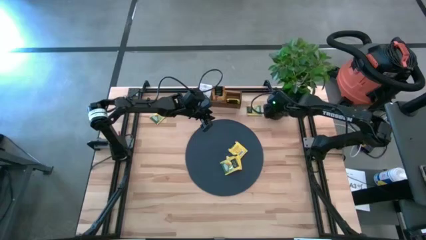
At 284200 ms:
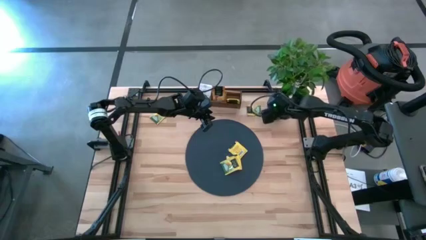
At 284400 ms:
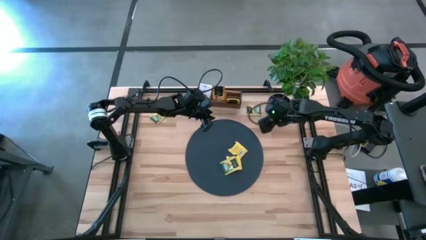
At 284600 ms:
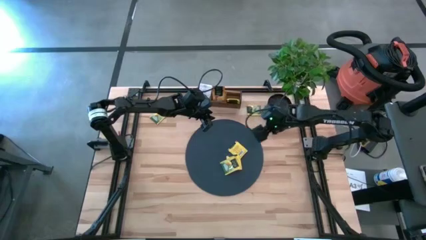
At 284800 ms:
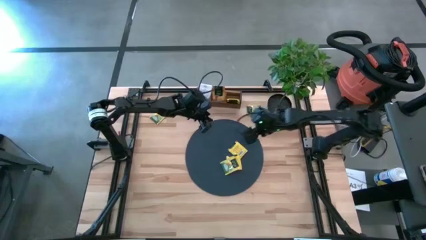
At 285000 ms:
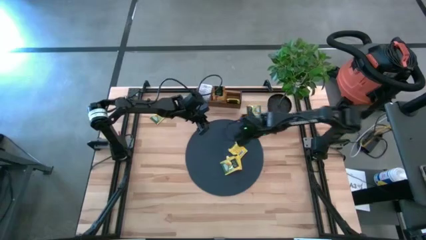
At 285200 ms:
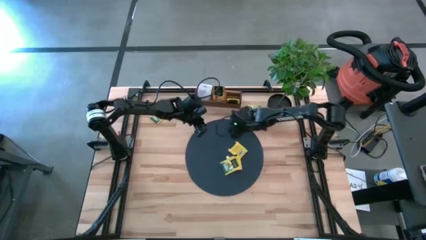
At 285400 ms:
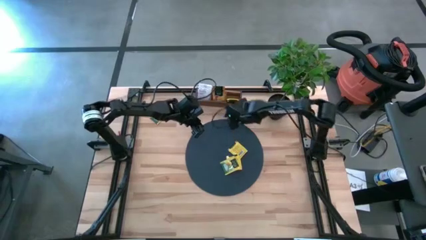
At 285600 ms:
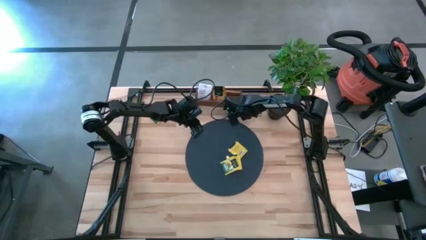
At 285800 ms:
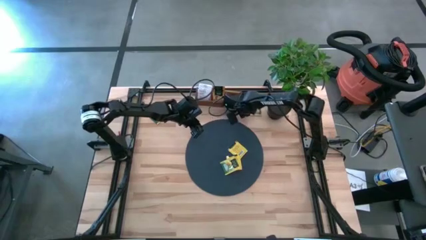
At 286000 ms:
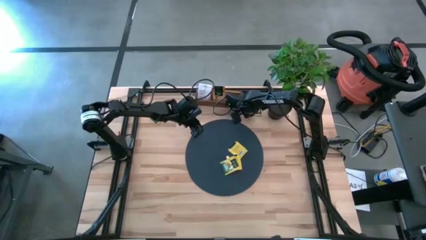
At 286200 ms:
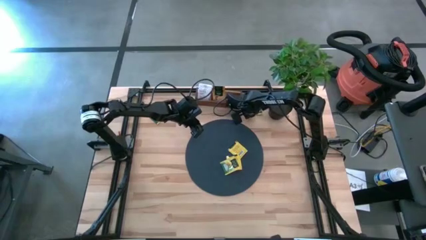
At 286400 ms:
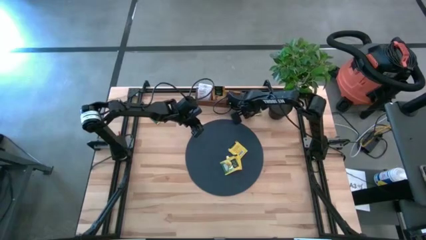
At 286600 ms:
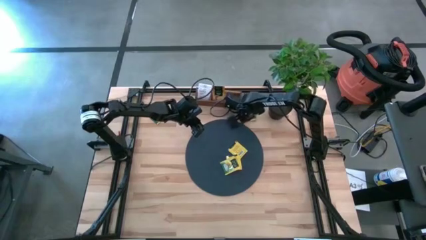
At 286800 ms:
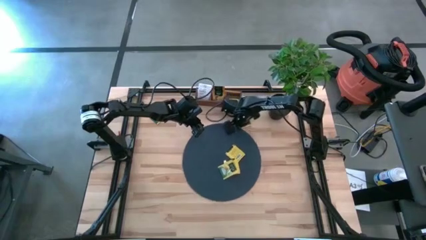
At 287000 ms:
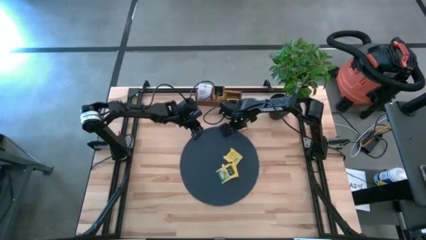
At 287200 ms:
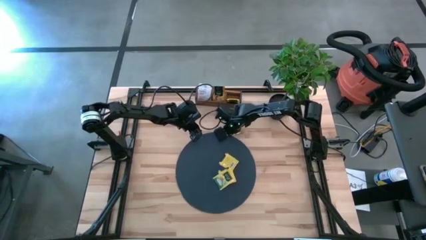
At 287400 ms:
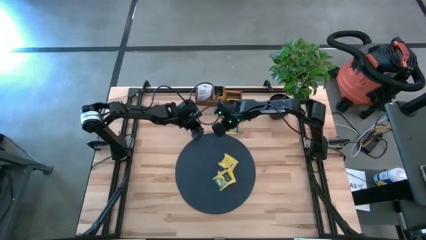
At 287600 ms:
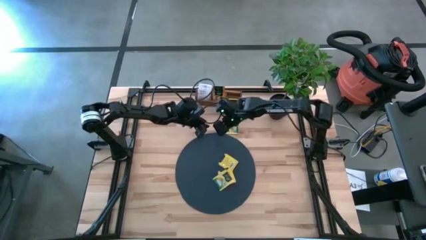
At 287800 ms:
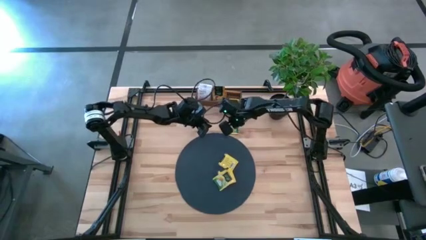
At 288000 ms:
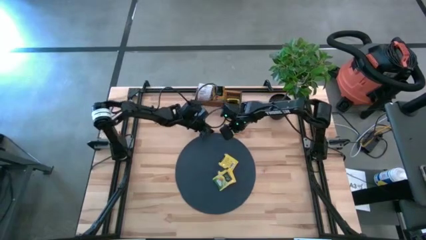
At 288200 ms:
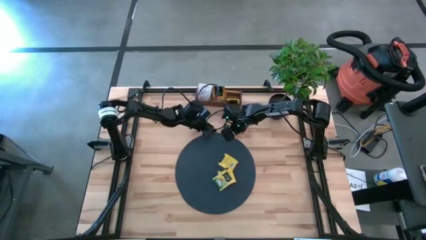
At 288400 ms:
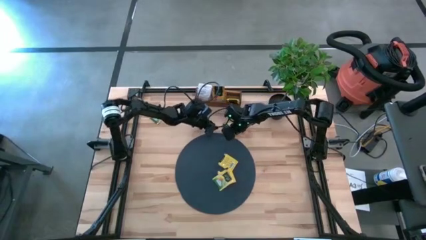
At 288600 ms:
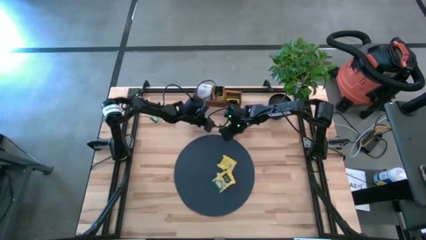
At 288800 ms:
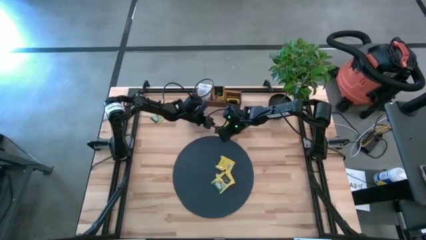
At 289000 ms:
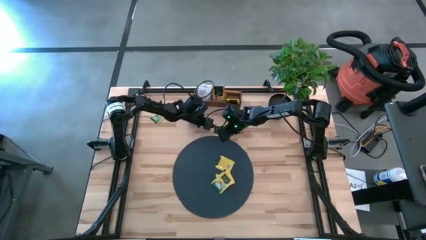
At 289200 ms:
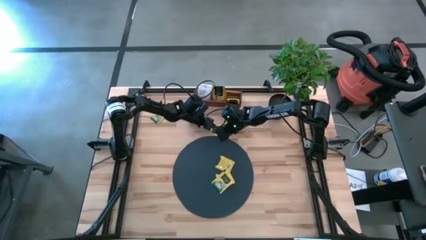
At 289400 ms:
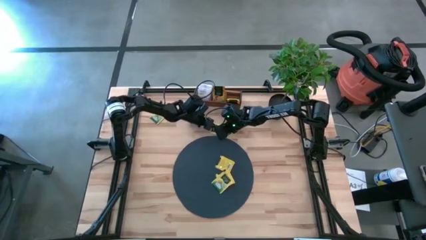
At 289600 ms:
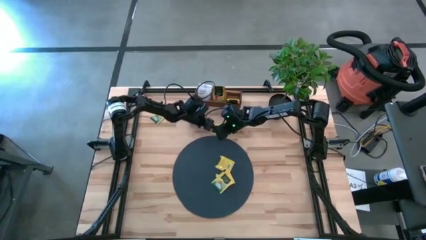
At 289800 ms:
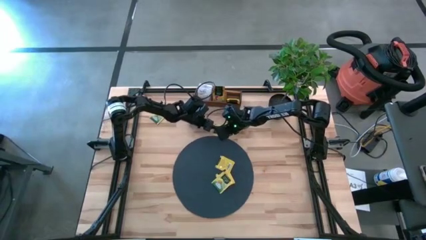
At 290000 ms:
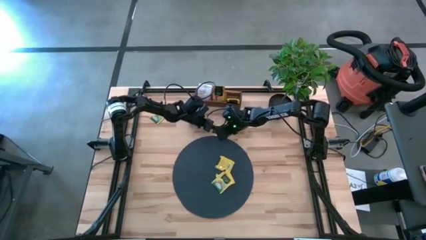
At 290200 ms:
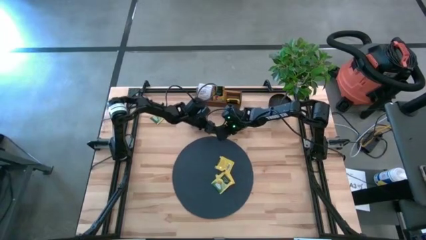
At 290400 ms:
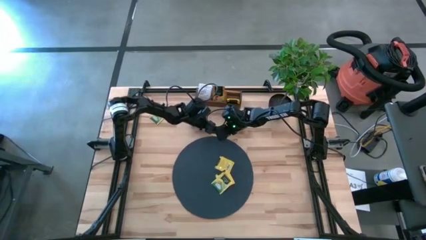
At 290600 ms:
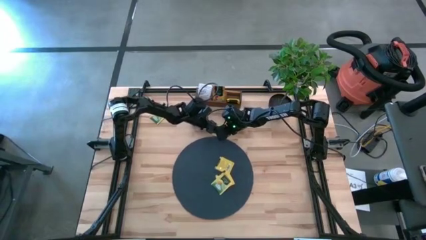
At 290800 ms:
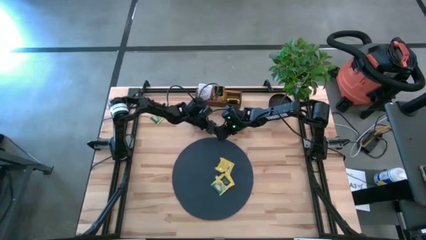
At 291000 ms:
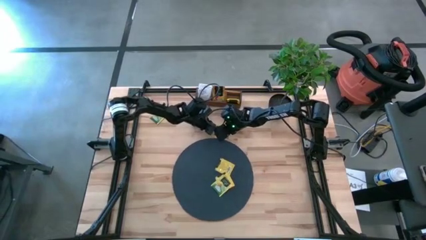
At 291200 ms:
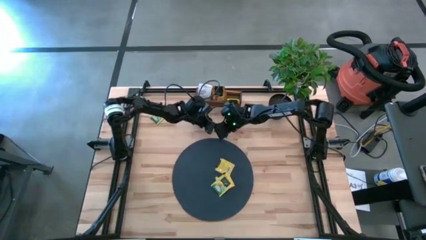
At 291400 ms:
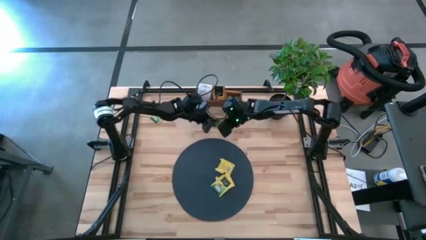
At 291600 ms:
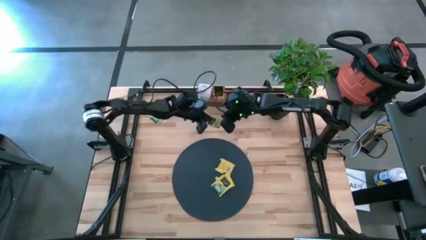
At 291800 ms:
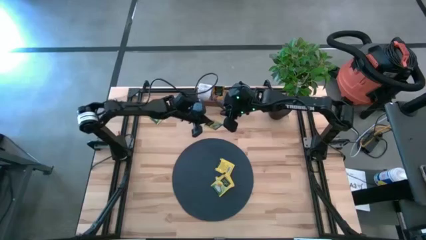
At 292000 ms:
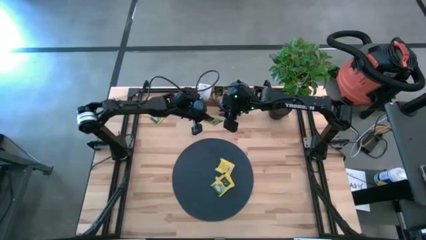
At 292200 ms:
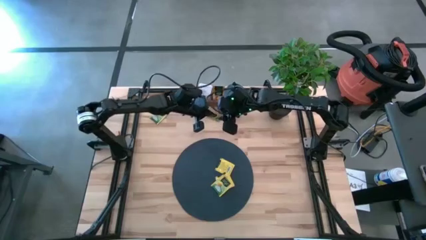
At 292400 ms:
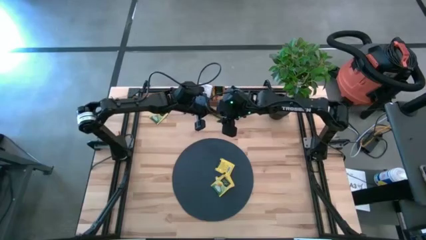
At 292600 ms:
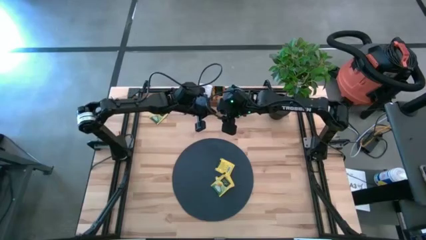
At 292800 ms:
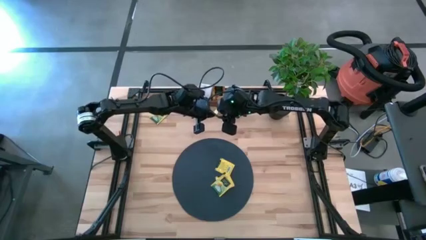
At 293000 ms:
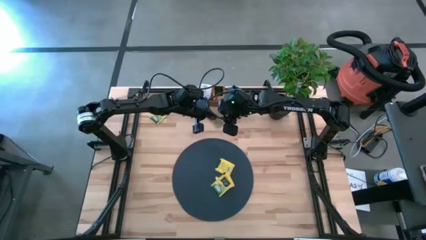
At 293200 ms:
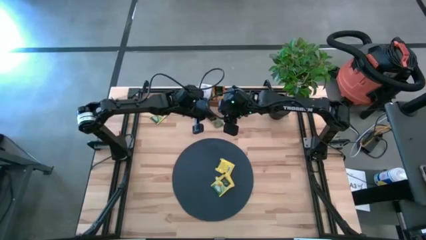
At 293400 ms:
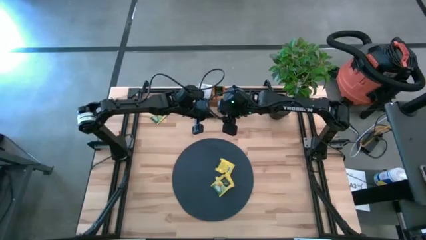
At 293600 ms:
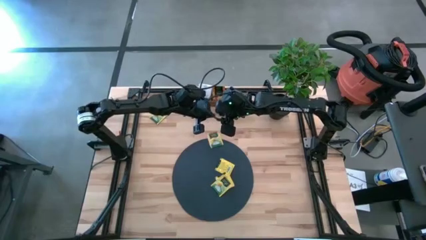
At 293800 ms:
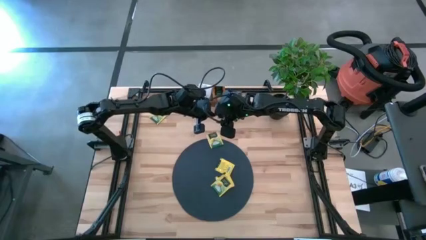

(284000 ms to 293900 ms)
Task: Pick & Place Tea
Put the green tea bag into the right section of the wooden organizer

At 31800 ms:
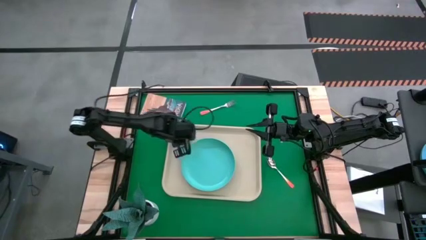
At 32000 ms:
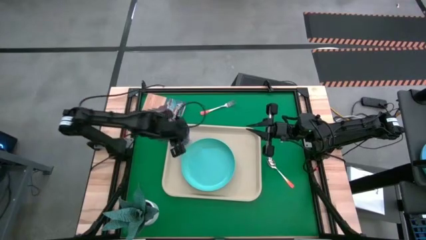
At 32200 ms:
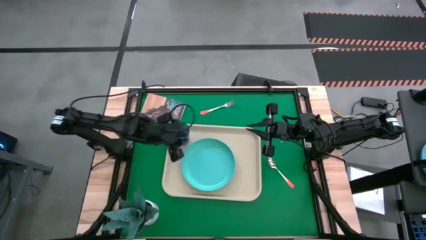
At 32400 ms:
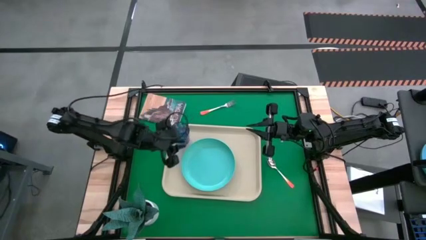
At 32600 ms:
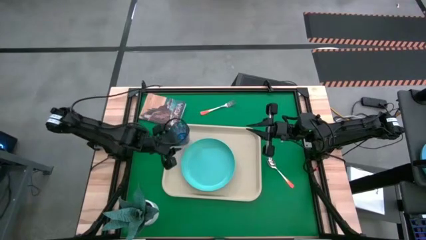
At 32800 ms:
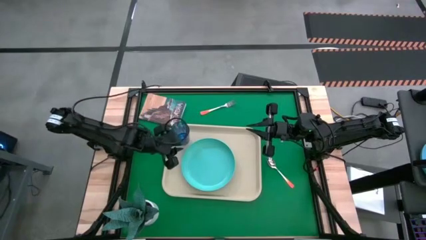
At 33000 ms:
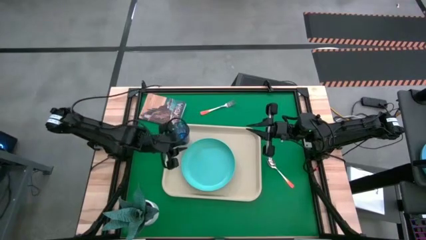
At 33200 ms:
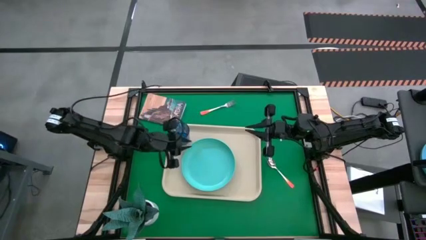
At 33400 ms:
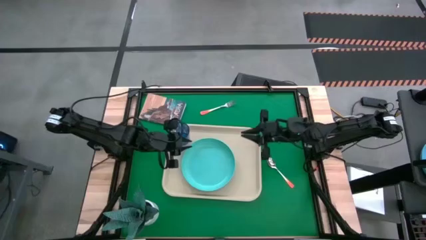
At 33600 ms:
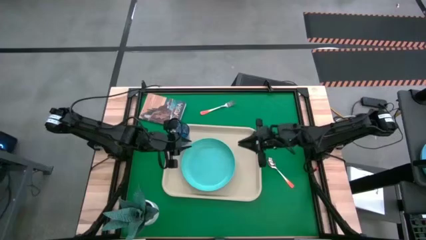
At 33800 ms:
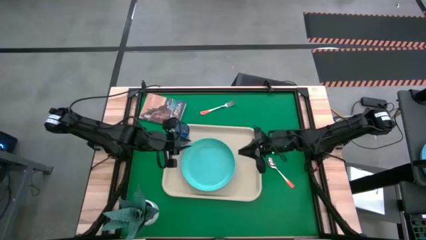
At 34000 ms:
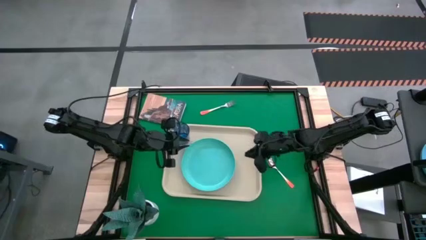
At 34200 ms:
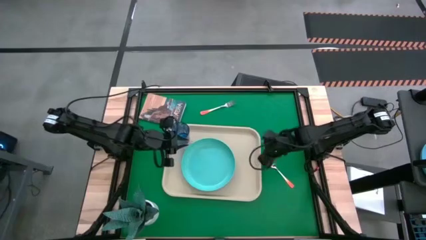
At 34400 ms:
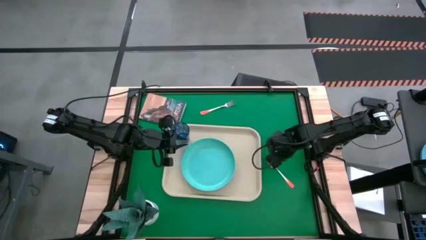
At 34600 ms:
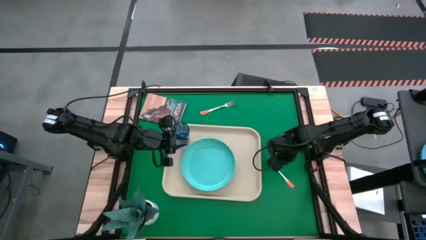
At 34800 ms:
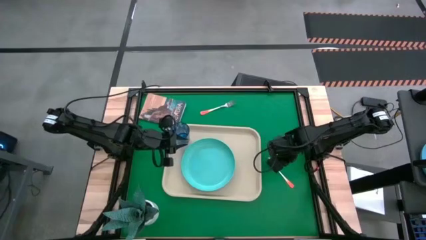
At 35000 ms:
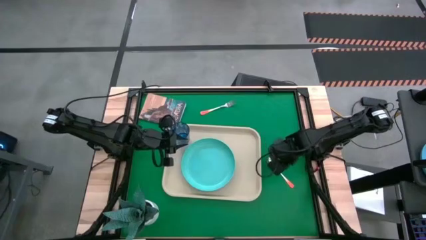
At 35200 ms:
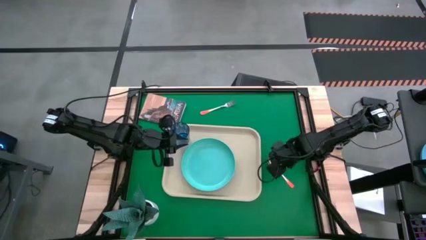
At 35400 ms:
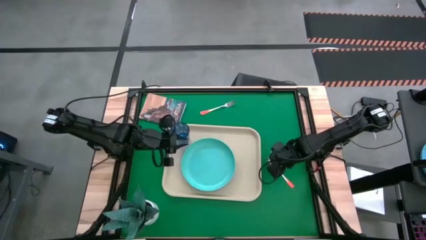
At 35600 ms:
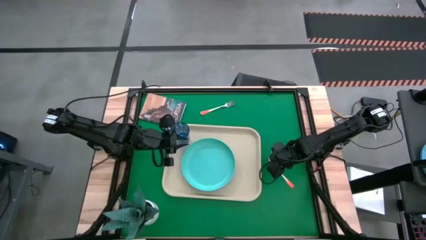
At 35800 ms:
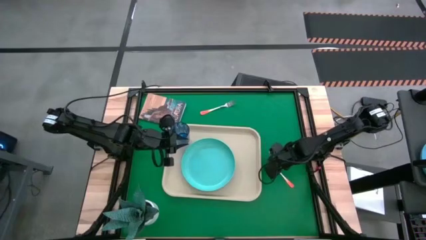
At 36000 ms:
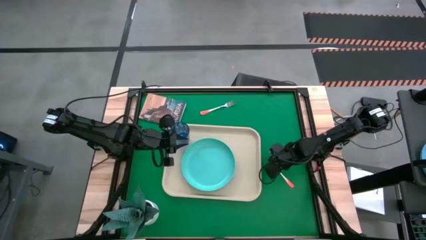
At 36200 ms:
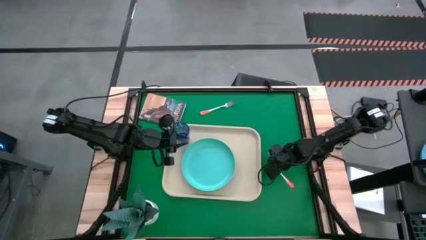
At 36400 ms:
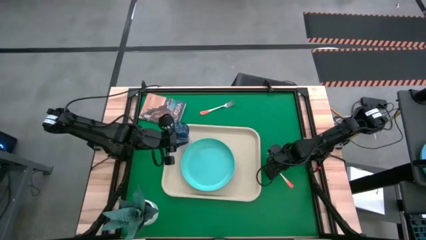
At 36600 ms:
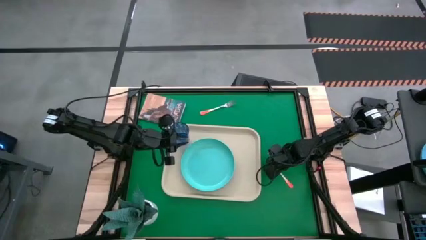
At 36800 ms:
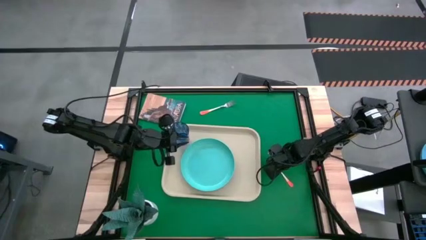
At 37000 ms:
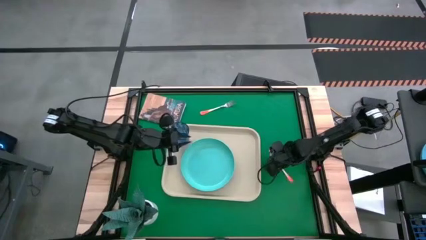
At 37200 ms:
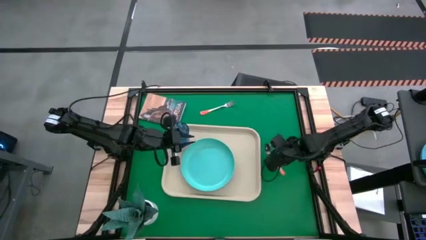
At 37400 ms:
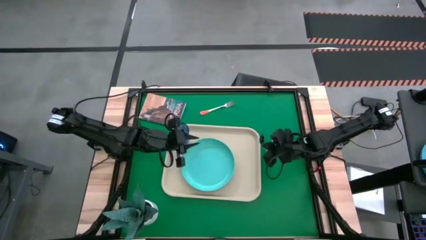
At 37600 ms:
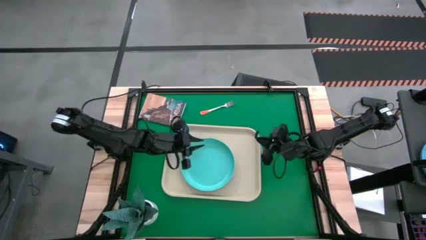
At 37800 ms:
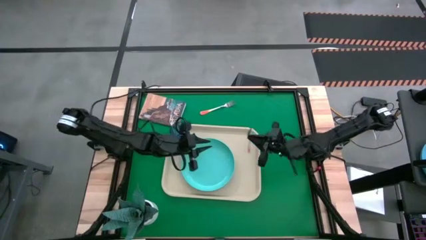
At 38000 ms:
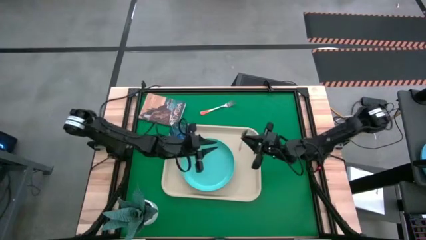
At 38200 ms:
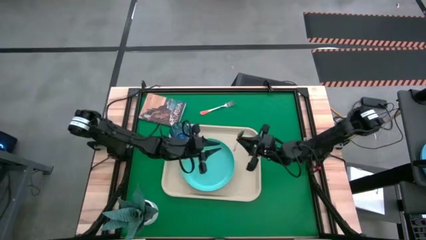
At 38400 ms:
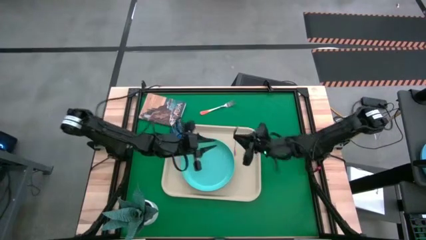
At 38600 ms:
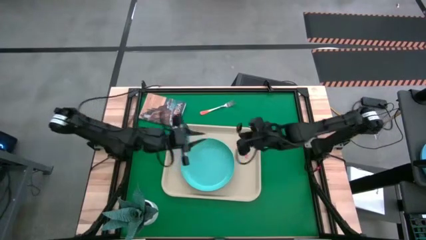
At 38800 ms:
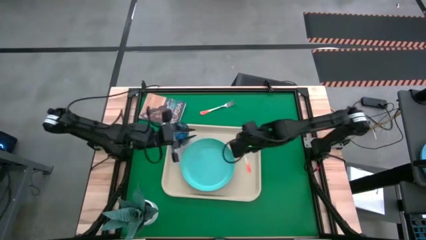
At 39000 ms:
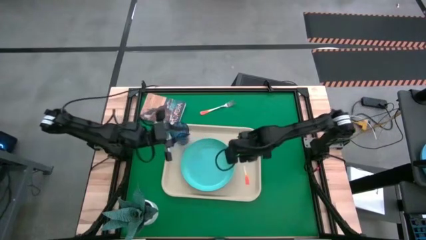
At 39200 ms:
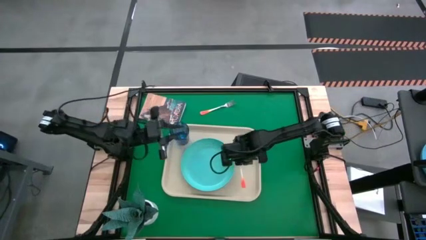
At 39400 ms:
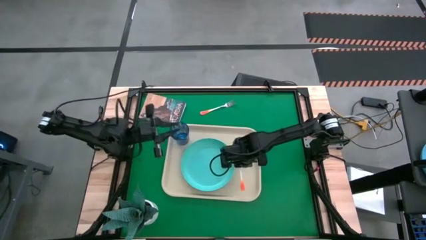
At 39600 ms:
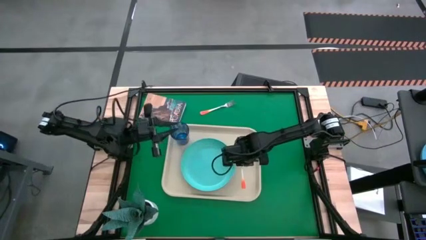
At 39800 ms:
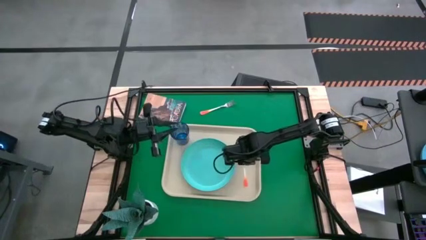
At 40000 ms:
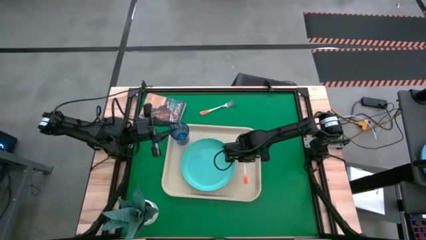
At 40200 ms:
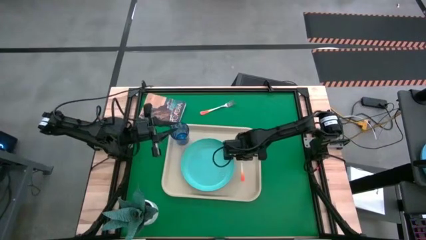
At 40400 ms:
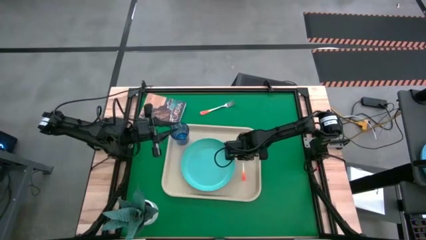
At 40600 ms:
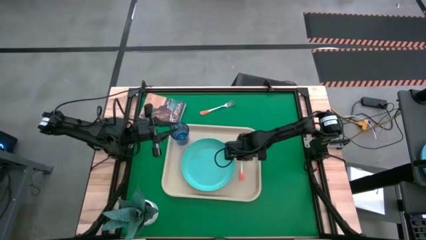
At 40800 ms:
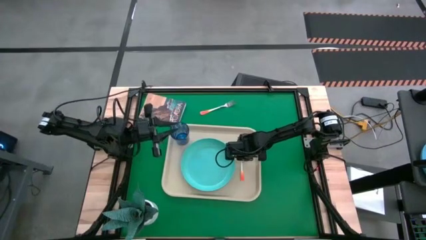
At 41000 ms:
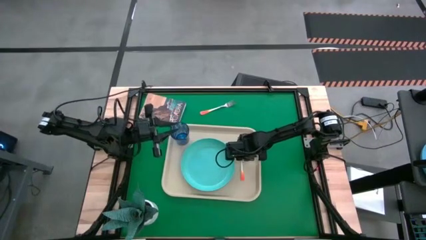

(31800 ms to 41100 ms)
Task: Pick and place plate/cup/fork/spoon on tray
Put the orange spoon on the white tray to the right of the blue plate
